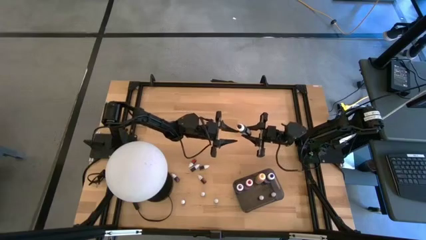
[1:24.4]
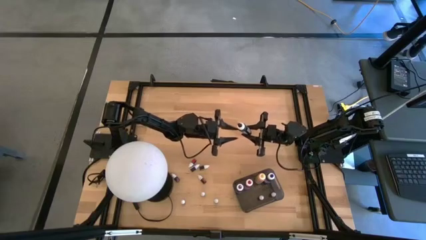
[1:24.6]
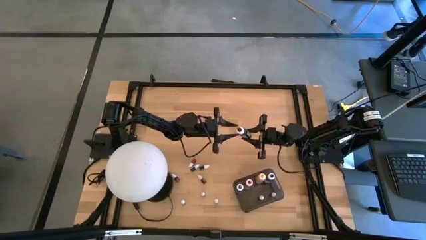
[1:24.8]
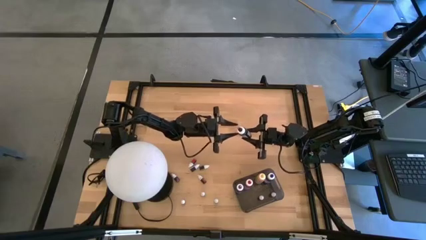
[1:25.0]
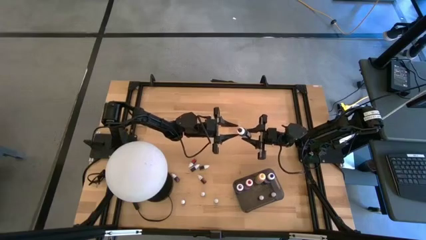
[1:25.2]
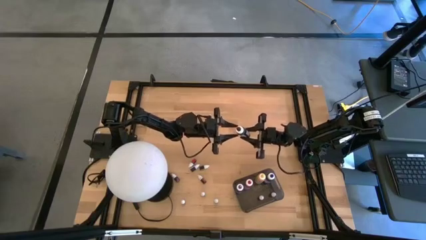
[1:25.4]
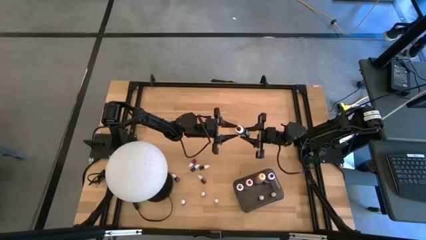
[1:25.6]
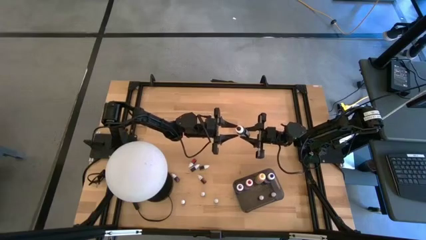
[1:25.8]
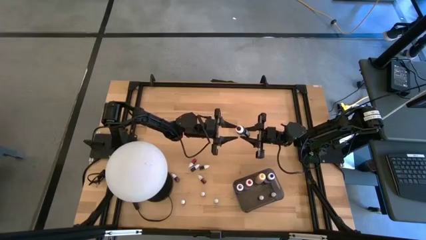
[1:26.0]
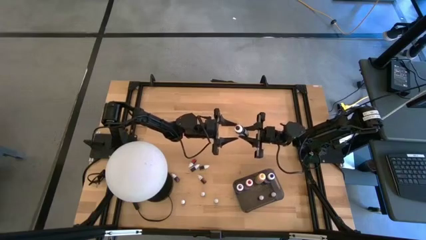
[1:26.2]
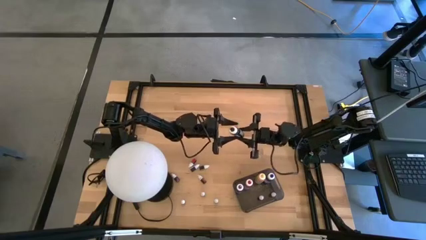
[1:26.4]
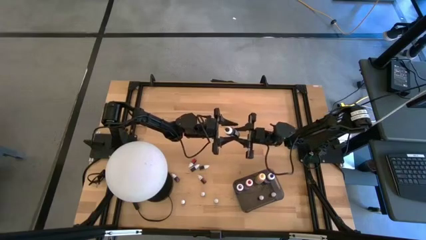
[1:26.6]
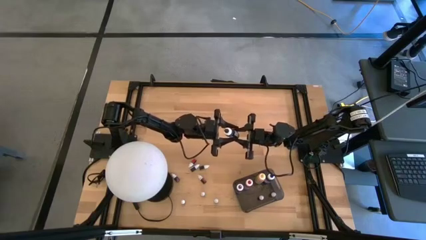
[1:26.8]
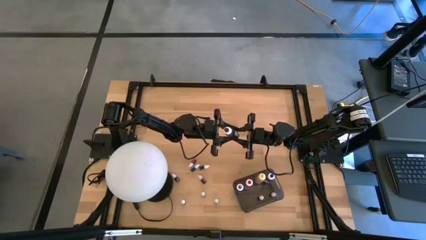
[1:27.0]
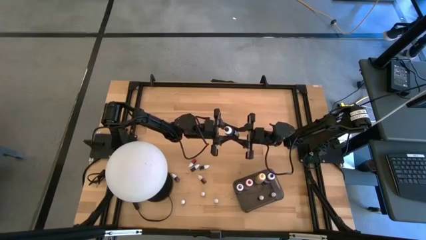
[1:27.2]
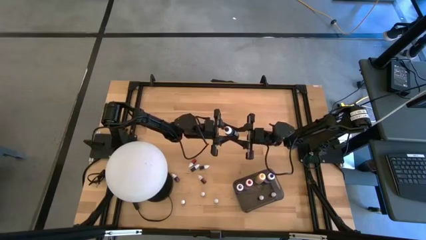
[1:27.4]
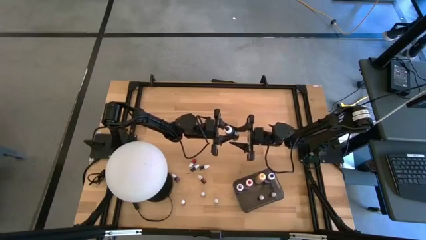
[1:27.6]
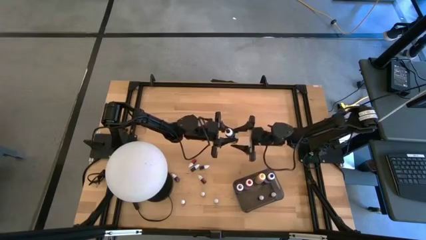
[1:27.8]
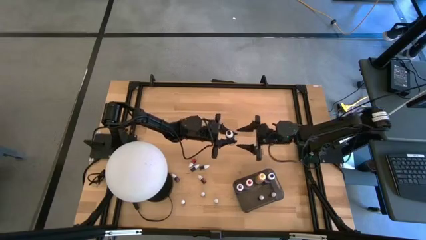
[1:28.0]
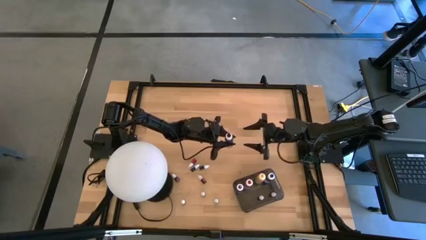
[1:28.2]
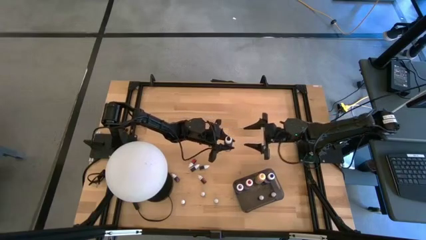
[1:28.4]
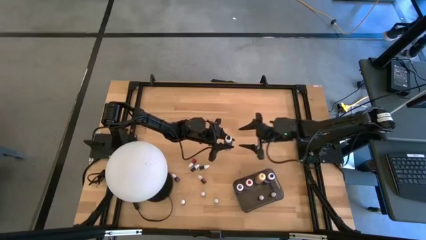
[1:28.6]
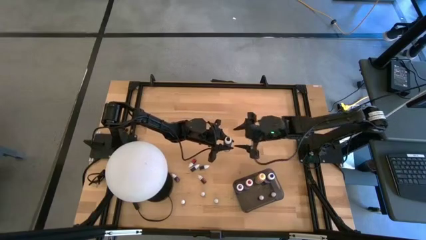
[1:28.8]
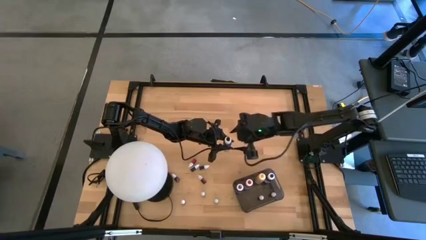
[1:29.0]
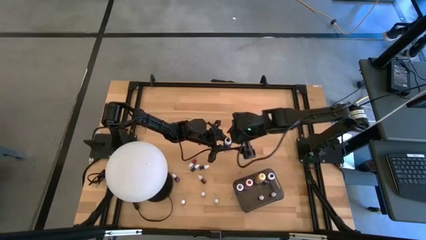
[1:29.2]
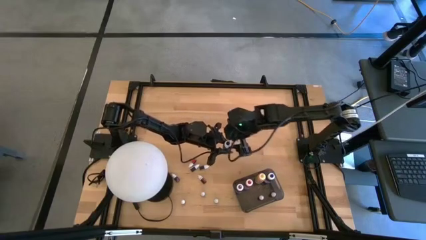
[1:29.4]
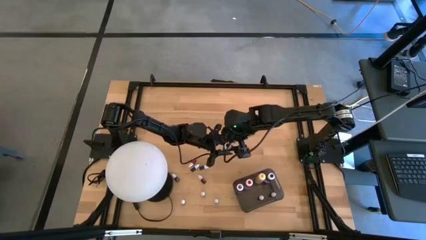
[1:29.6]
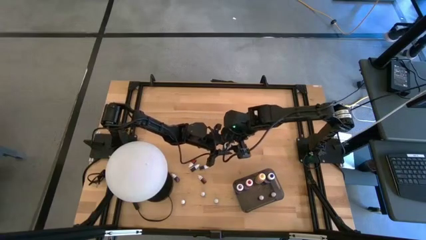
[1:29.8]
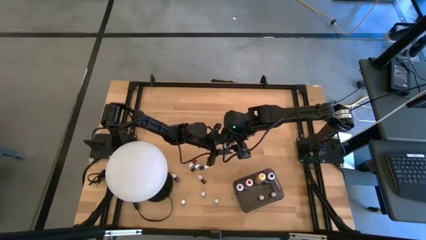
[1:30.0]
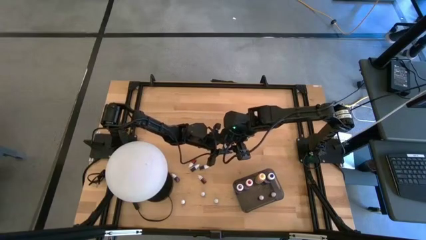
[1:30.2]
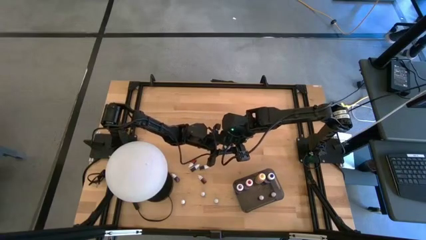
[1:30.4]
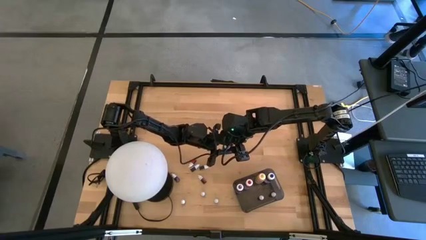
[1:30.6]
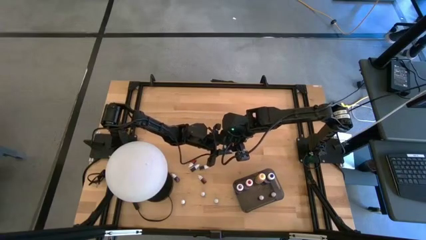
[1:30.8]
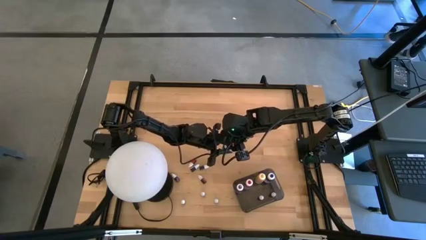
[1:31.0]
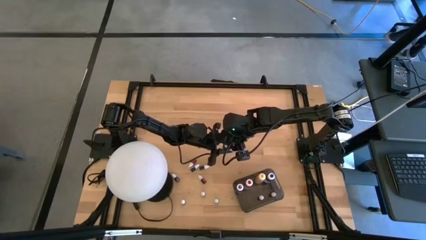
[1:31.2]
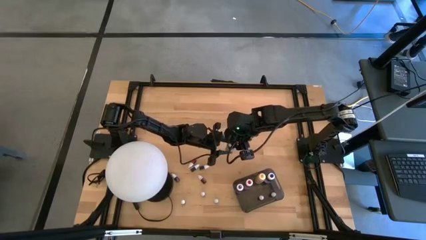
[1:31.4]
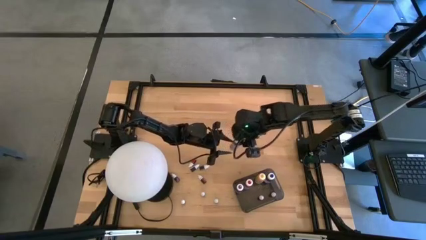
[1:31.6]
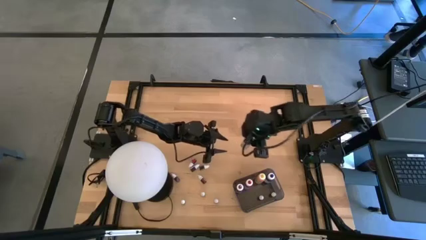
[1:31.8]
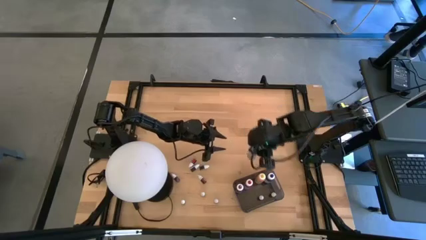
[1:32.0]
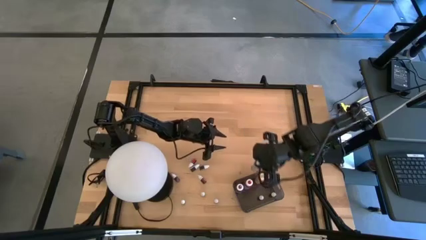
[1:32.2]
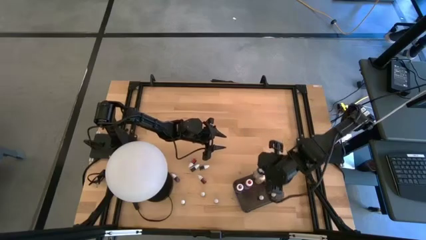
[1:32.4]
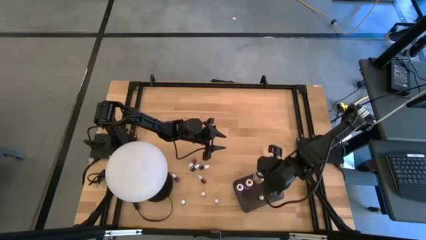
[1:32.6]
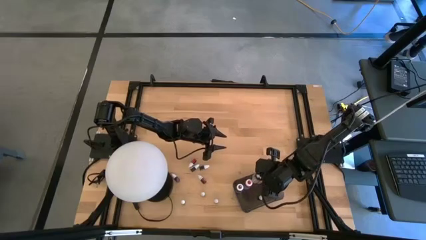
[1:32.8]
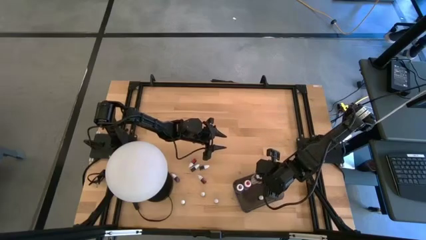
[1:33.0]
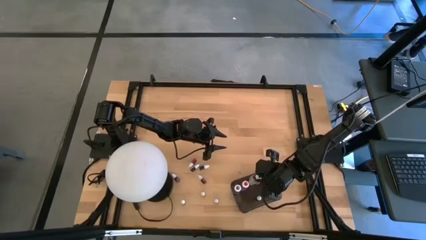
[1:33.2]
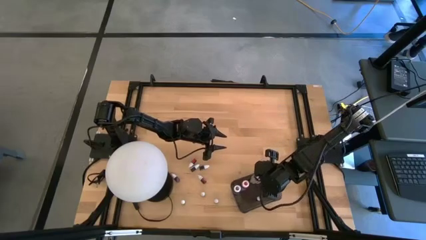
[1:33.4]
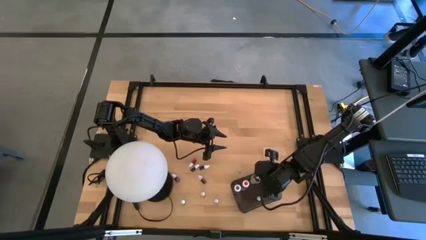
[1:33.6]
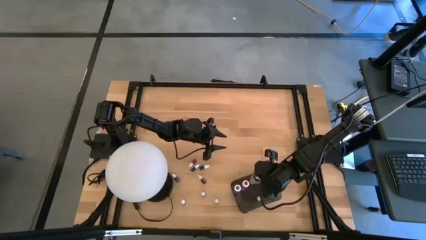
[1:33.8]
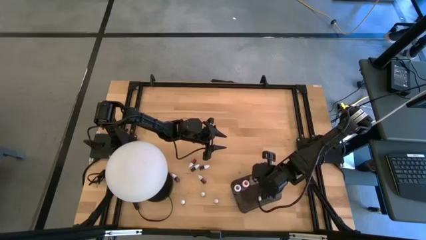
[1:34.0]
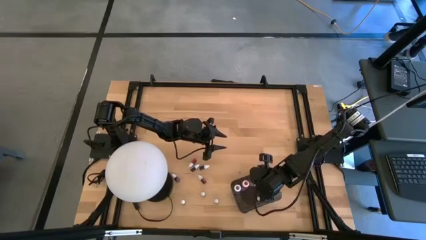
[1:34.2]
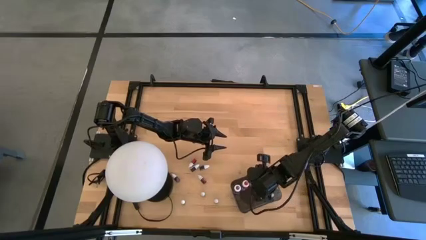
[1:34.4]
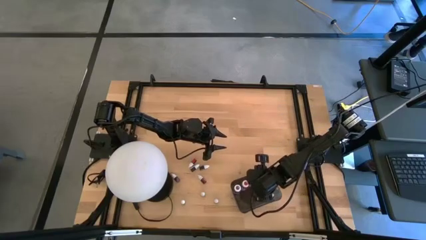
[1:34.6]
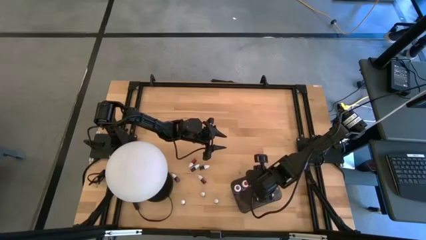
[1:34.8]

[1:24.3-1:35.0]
Task: Pick & Place food coloring
Put the large black food coloring bottle into the bin

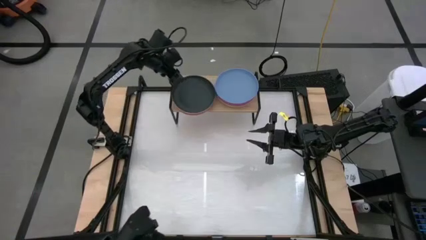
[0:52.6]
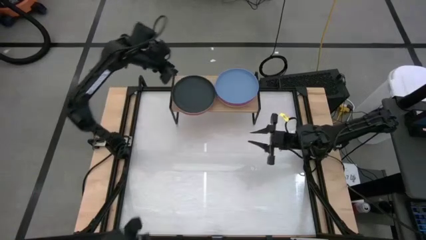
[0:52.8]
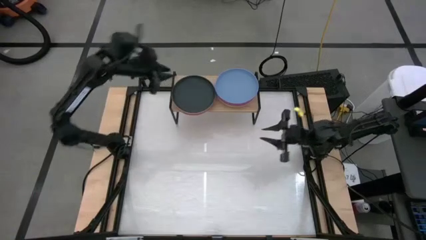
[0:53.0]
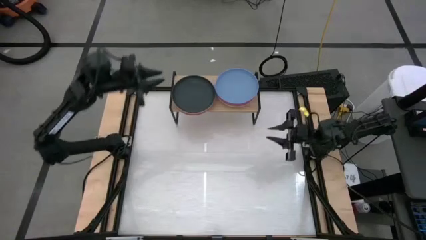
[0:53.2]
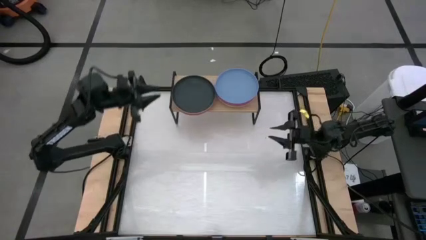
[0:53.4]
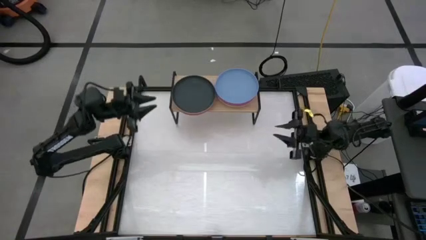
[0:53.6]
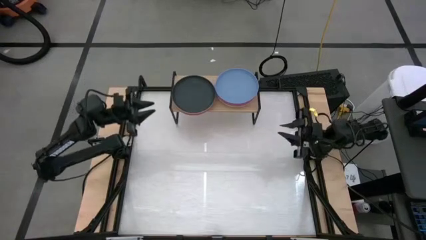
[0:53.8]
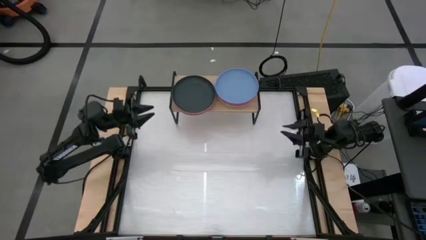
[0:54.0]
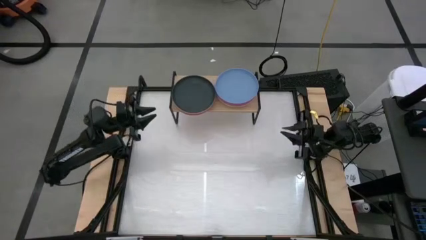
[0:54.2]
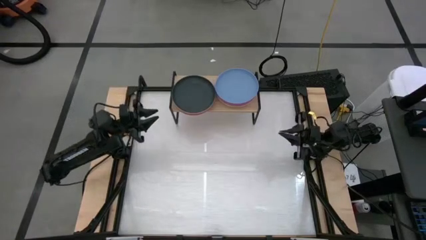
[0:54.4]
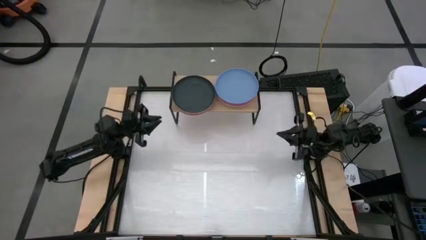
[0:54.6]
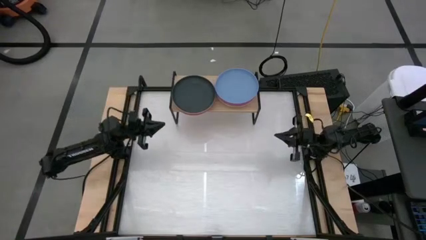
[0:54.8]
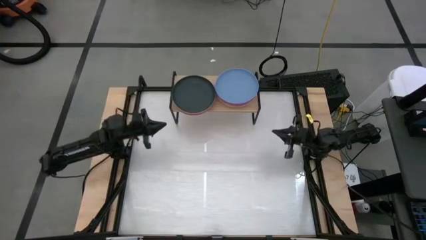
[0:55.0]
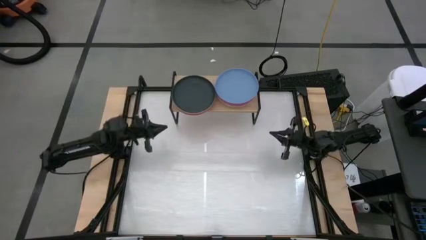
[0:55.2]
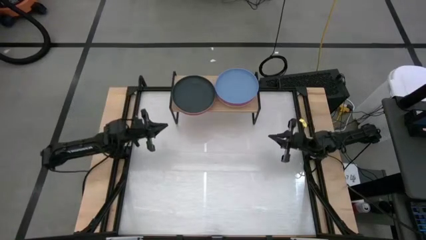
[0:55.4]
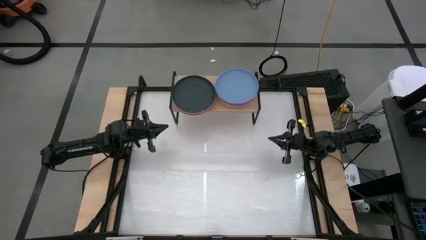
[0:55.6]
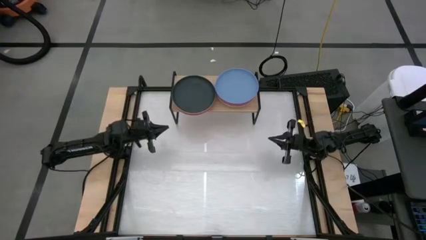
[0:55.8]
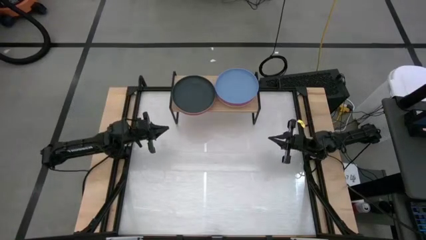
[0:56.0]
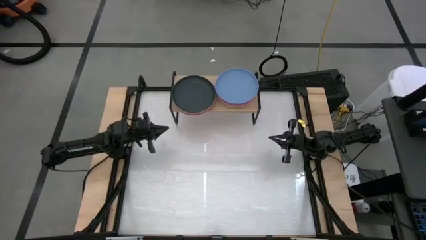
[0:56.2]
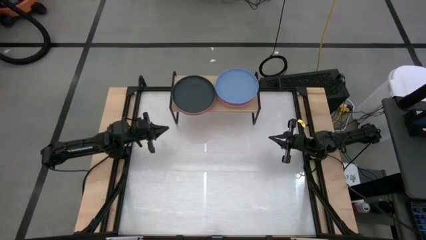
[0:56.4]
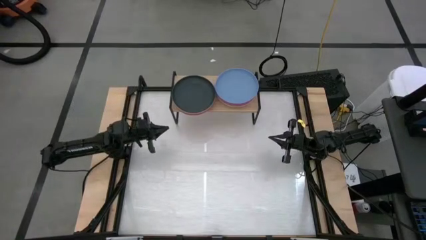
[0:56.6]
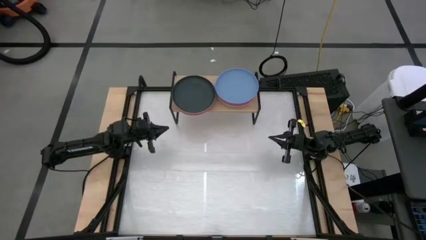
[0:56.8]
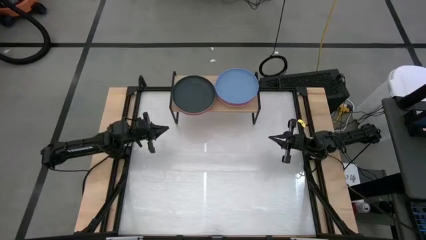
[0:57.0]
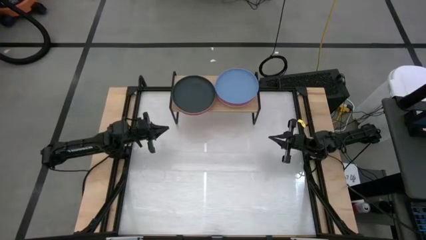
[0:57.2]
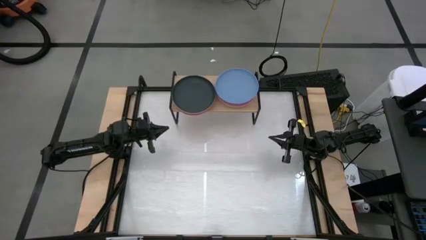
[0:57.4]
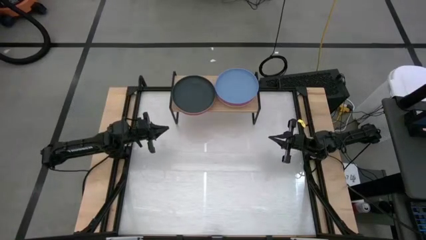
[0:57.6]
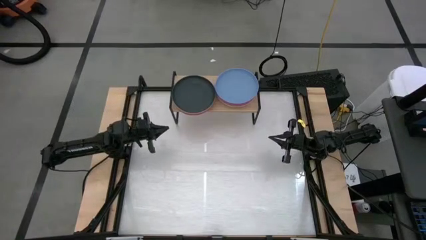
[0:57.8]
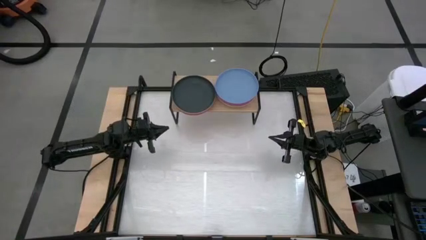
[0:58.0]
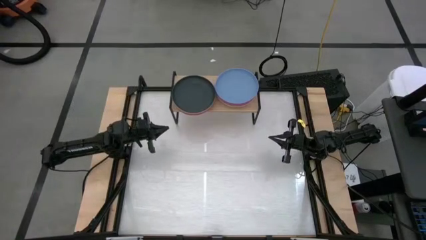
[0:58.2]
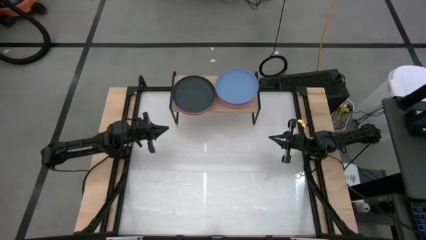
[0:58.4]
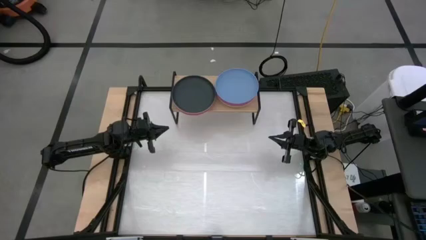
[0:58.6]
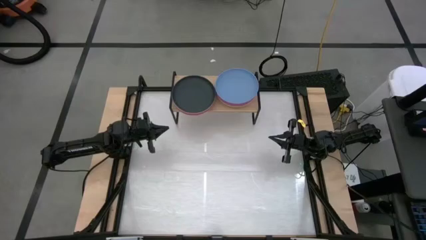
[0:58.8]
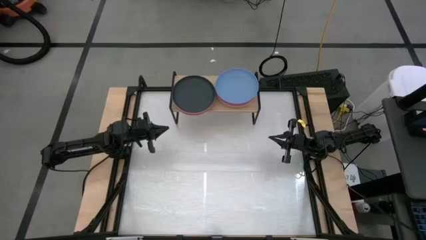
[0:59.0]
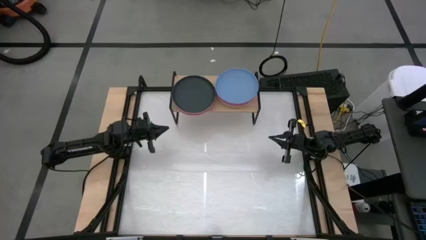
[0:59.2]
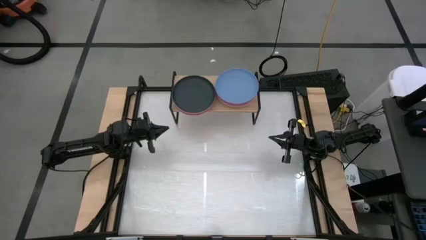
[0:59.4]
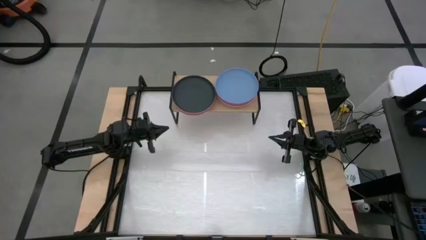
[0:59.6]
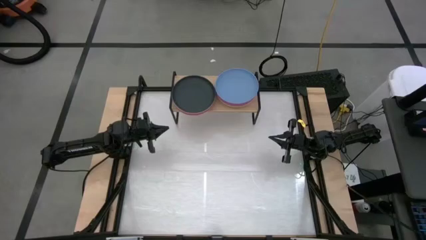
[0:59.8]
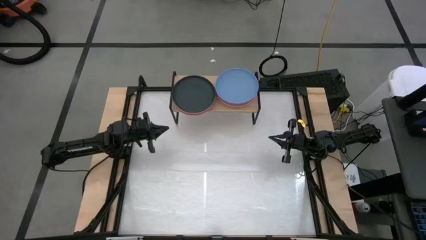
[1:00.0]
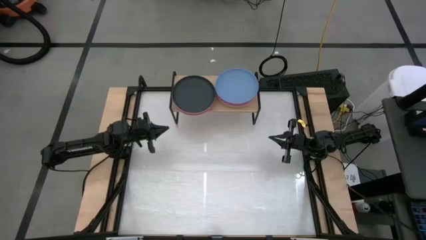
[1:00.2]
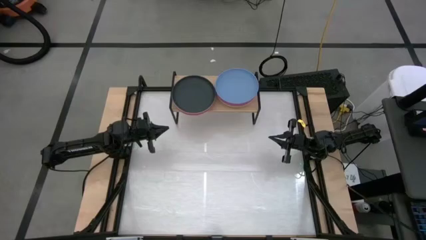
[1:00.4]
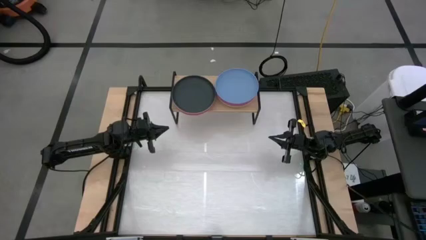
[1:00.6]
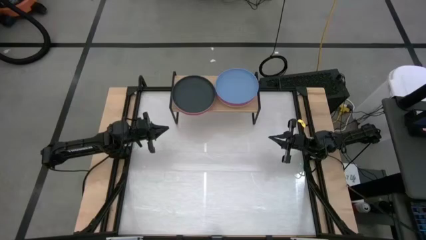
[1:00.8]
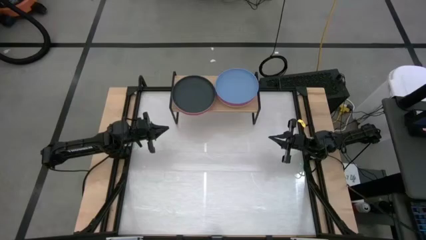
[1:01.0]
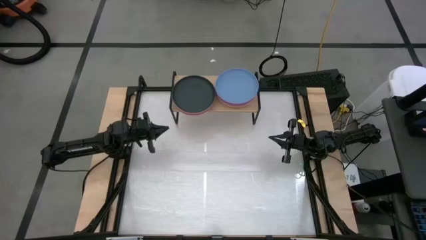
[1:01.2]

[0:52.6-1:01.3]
Task: Place and stack plates onto a shelf
Return to Home Position
